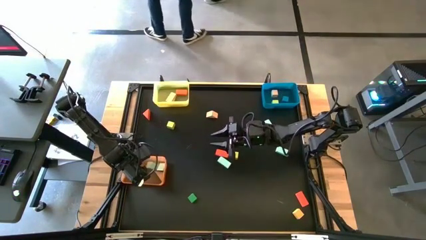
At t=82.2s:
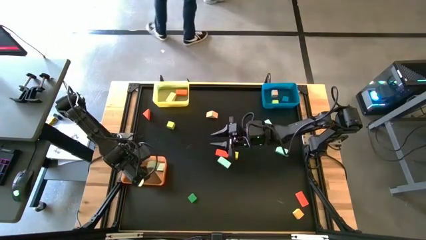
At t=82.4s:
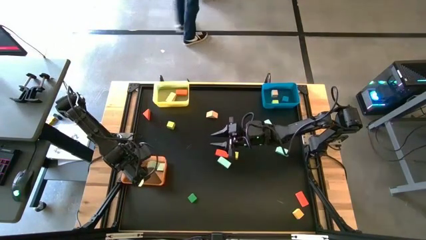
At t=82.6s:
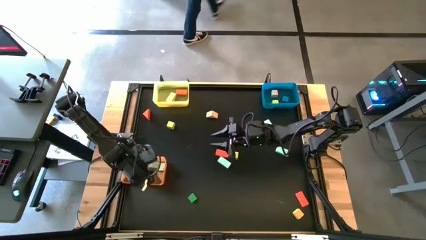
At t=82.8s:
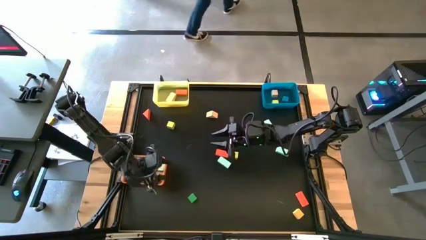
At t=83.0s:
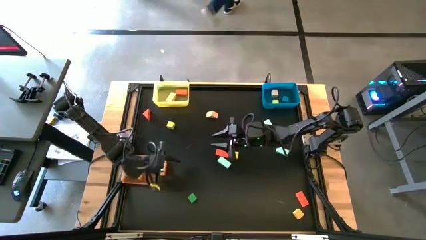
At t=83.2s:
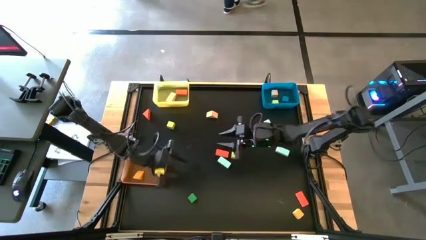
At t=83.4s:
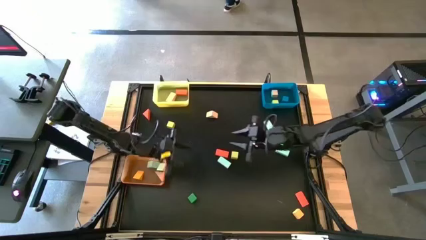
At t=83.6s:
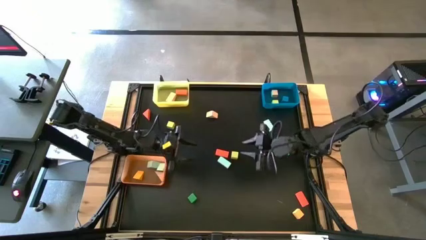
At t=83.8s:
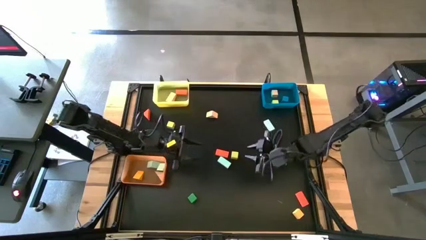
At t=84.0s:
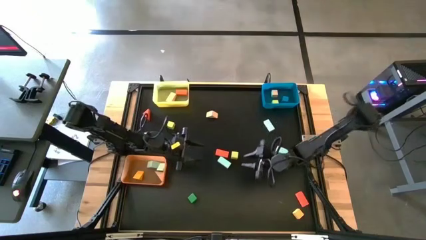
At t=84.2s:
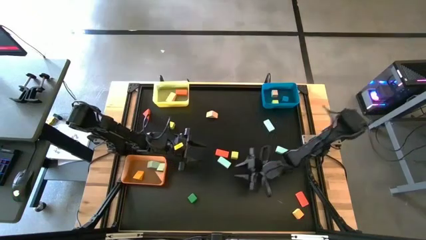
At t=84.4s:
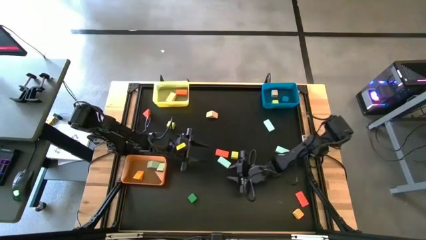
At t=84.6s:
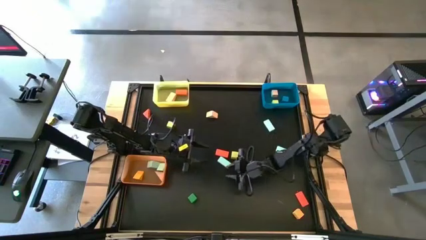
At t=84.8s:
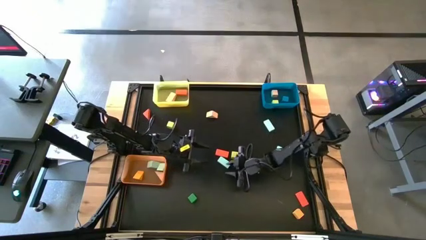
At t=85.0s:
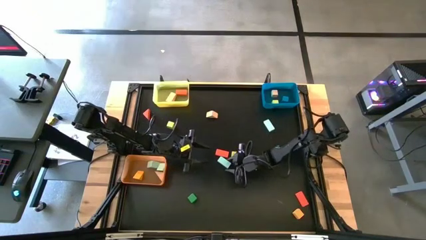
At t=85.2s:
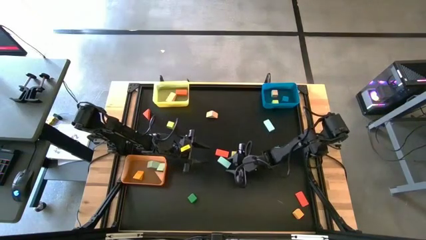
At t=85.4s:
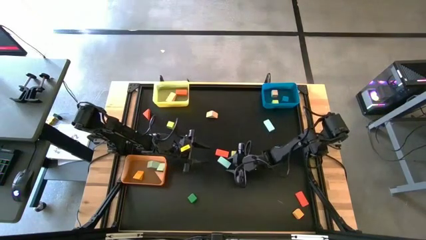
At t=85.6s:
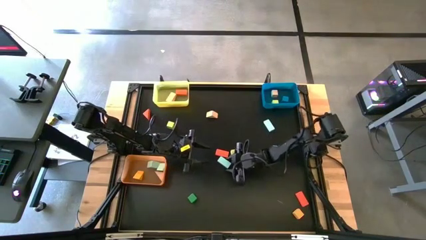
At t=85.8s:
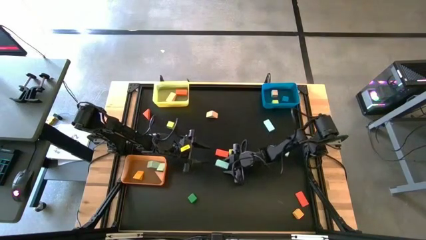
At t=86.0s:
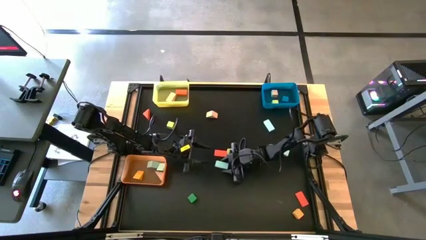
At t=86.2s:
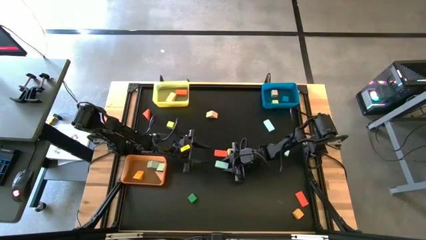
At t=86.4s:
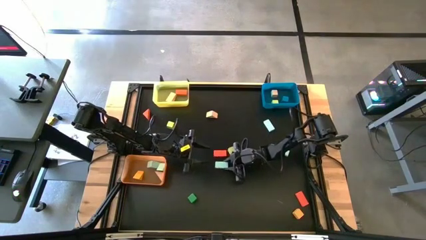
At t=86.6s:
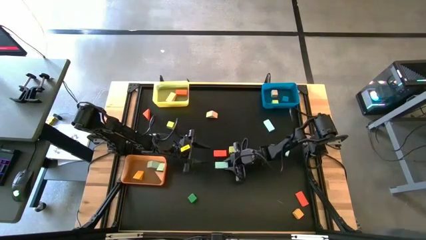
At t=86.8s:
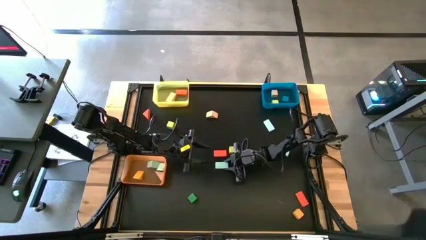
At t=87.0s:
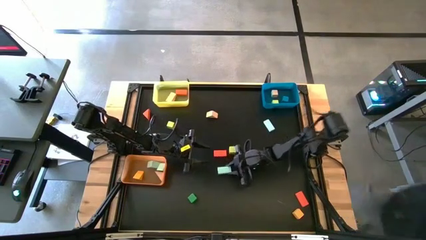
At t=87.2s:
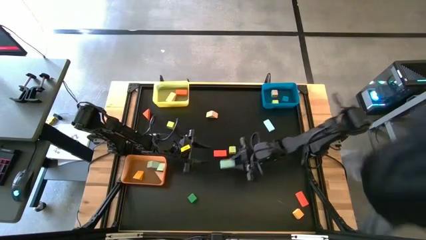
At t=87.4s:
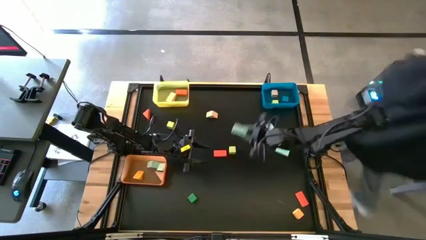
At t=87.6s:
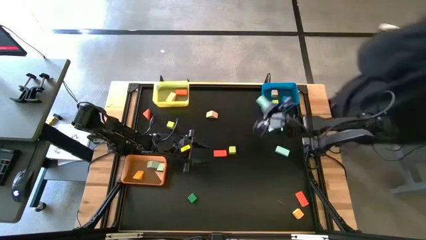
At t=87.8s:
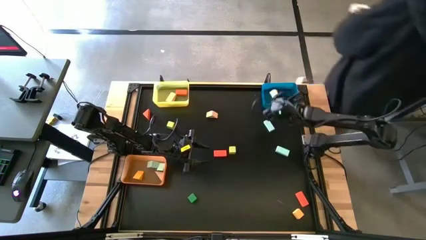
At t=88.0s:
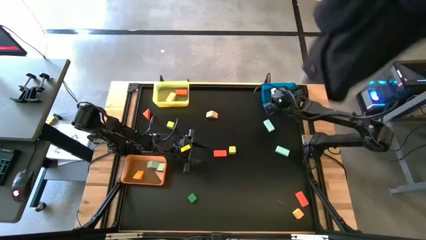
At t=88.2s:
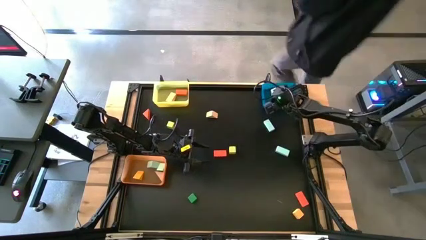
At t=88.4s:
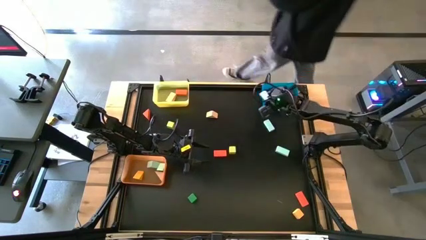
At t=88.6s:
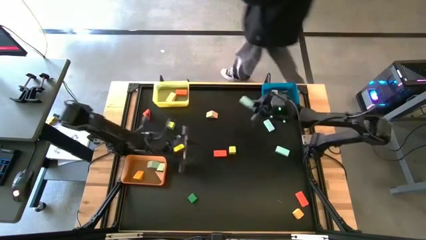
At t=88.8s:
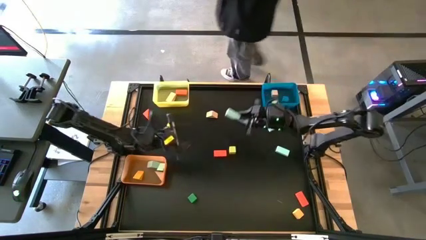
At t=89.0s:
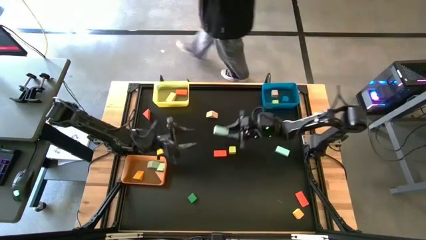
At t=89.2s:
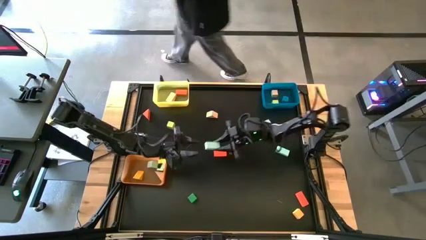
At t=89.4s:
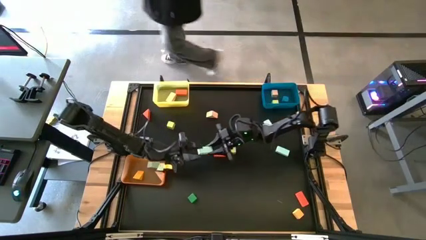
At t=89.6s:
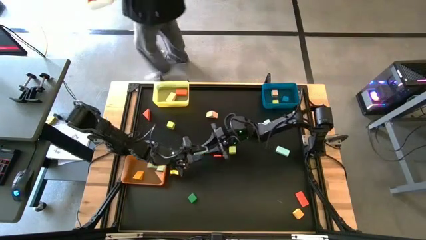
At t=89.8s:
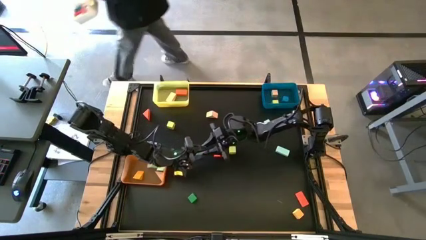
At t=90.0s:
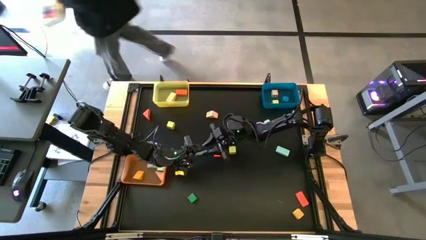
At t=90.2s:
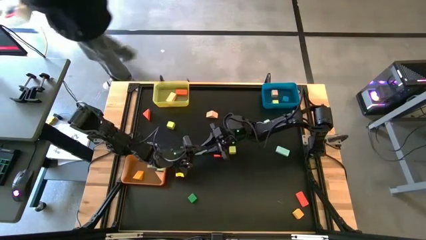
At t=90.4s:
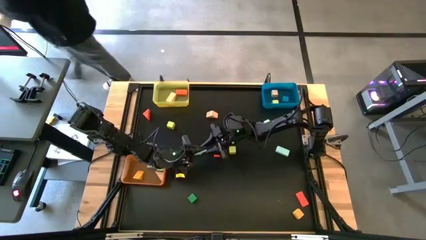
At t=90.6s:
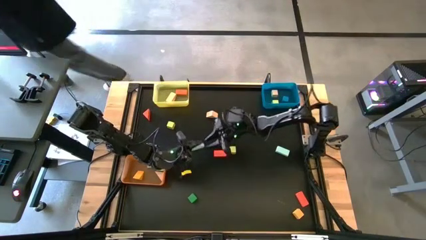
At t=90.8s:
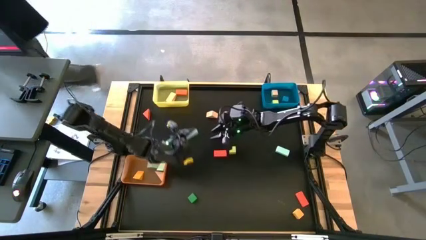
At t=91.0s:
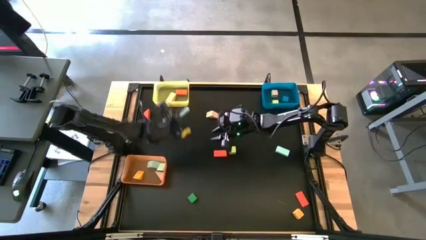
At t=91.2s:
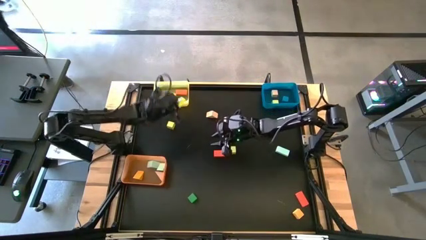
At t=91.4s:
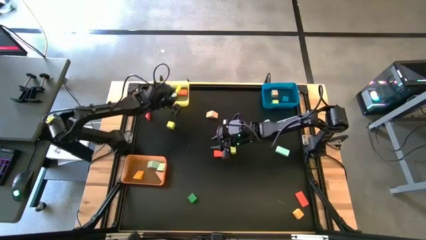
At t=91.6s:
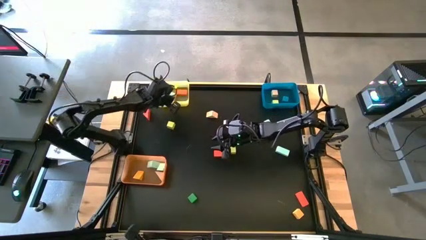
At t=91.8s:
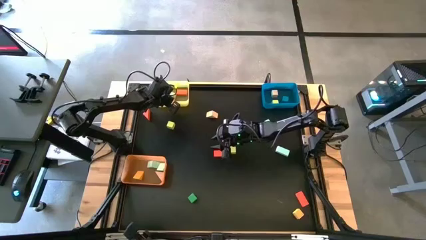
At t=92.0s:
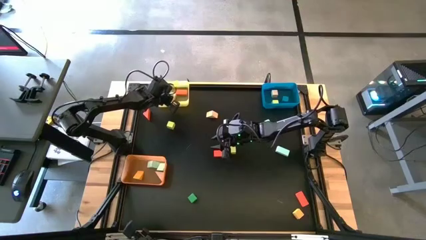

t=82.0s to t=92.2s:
Task: Sort blocks by size
Put the light green wooden block into the blue bin

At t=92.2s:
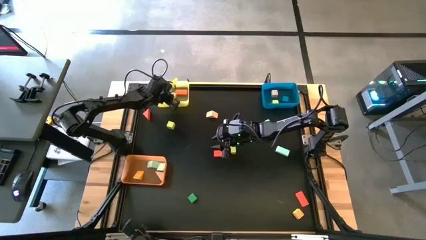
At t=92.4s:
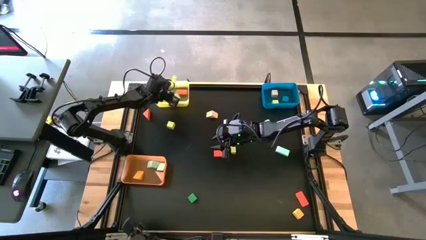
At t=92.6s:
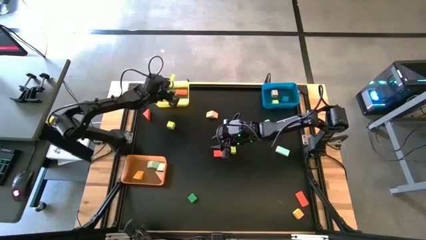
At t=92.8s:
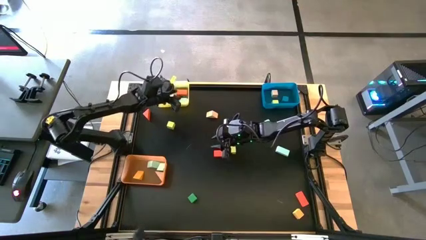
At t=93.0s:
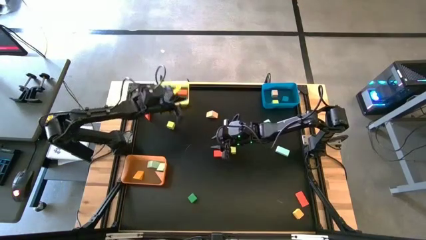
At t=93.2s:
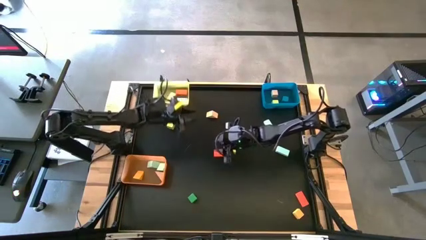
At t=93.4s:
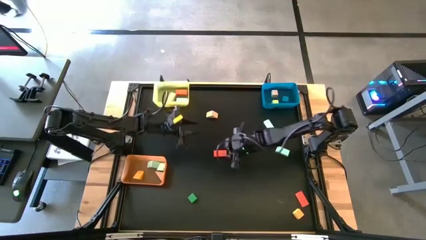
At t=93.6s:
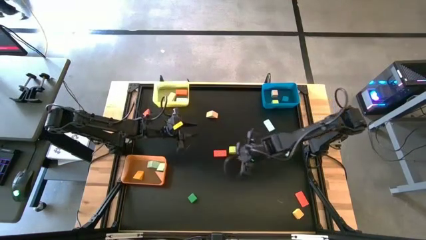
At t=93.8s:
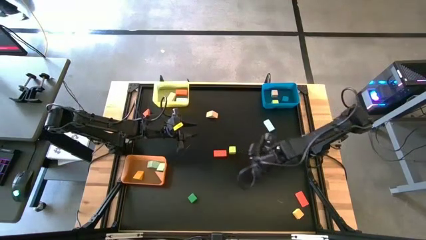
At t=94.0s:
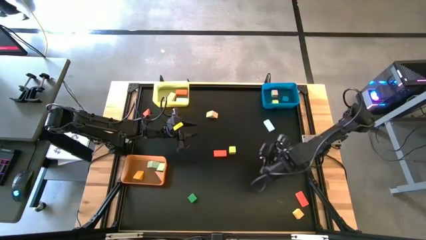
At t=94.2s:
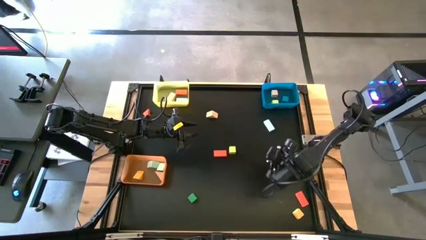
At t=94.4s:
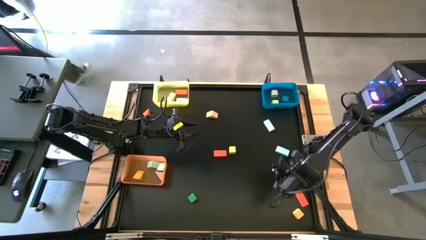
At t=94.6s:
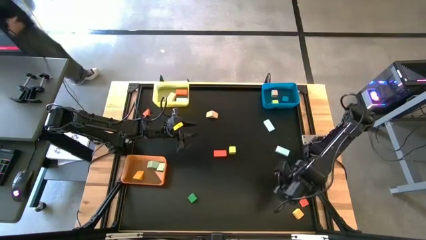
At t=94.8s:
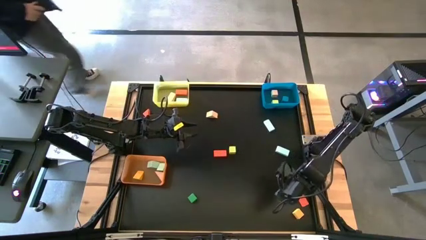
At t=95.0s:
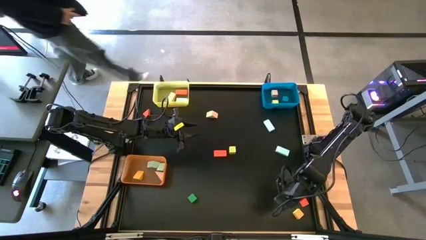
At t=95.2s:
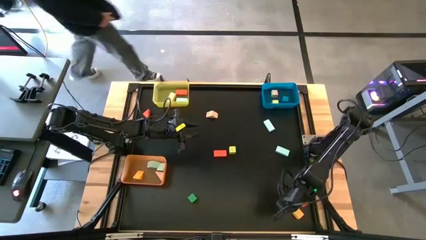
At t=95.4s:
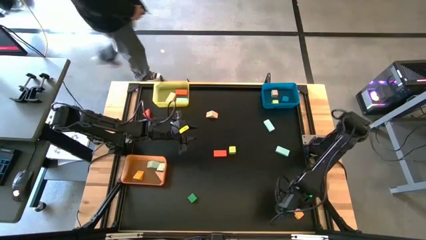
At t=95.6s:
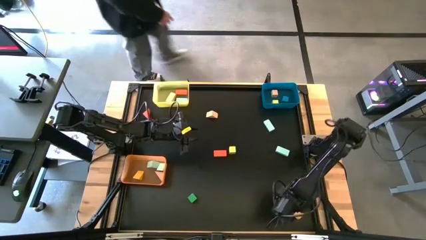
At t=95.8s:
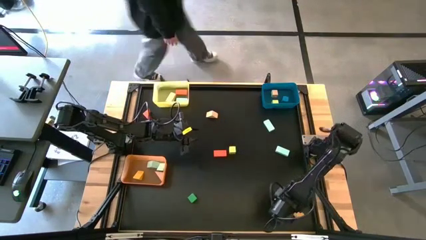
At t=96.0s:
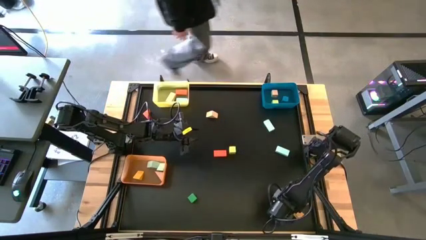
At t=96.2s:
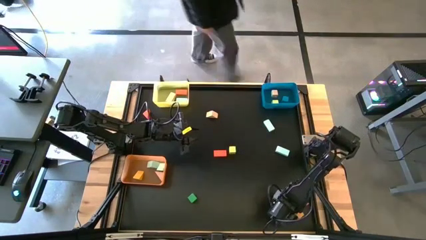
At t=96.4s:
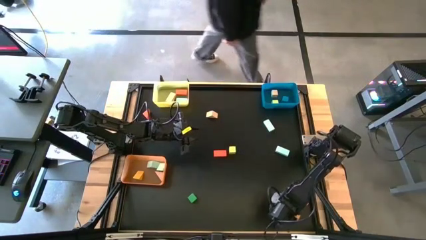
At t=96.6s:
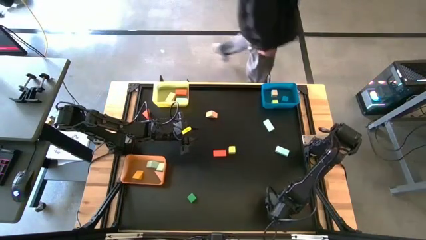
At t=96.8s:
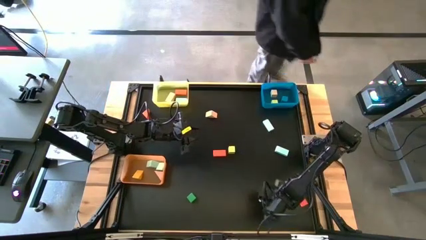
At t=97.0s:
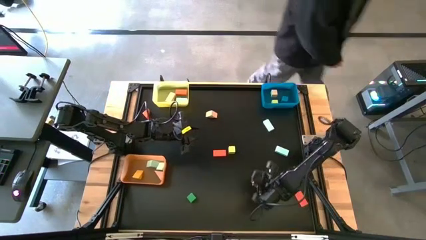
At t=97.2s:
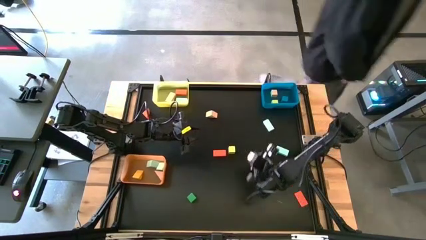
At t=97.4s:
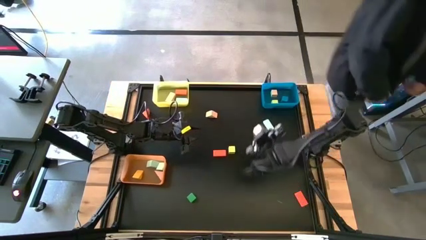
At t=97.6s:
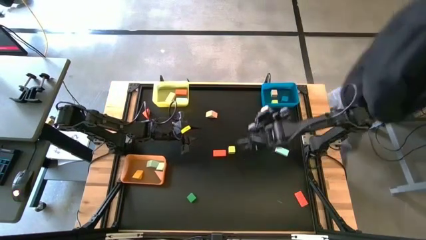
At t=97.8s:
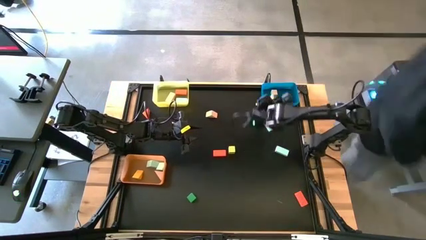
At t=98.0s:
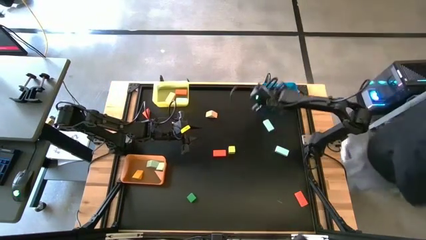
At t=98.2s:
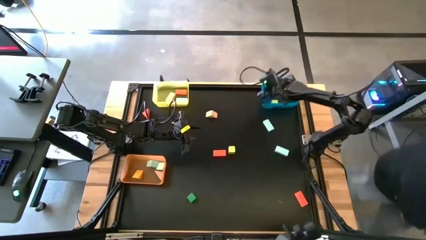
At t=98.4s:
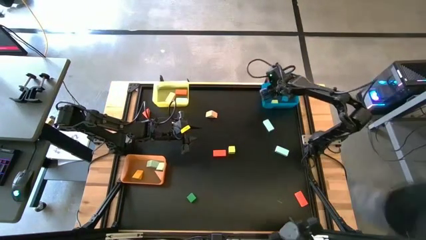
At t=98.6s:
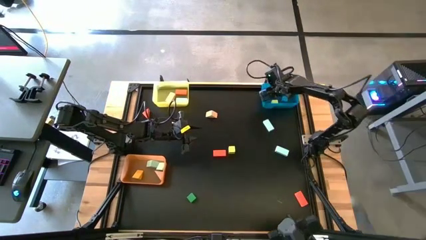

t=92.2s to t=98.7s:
Put the yellow wooden block into the blue bin
